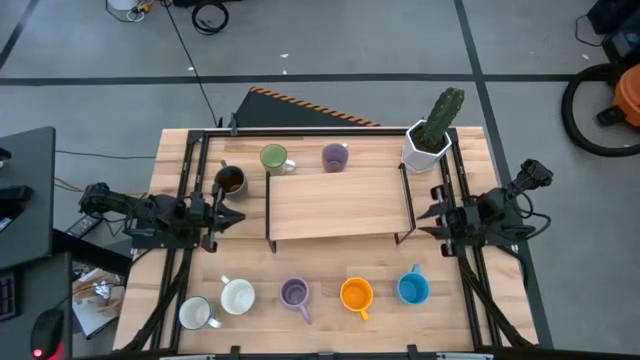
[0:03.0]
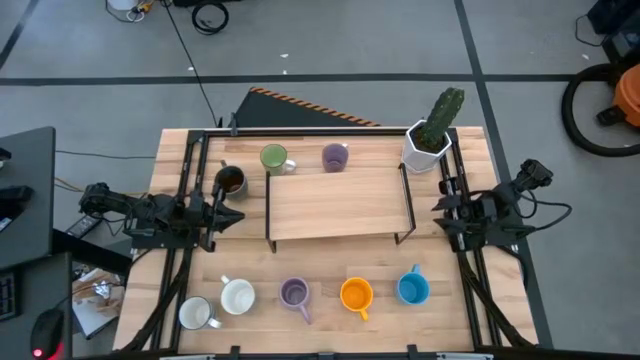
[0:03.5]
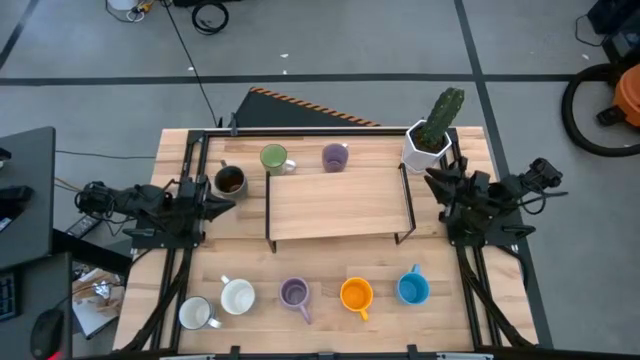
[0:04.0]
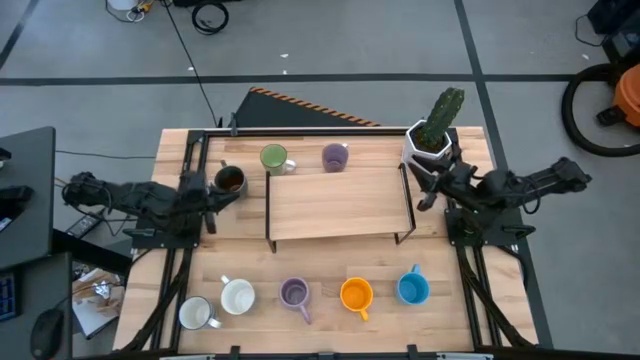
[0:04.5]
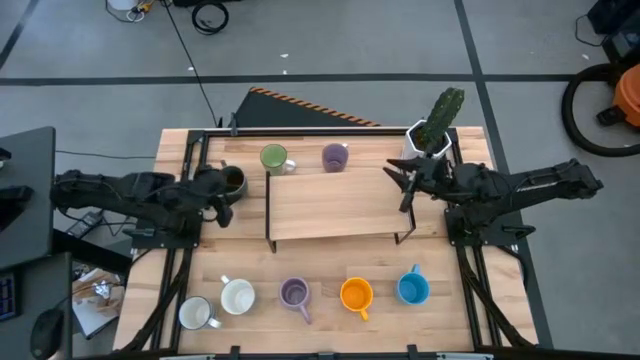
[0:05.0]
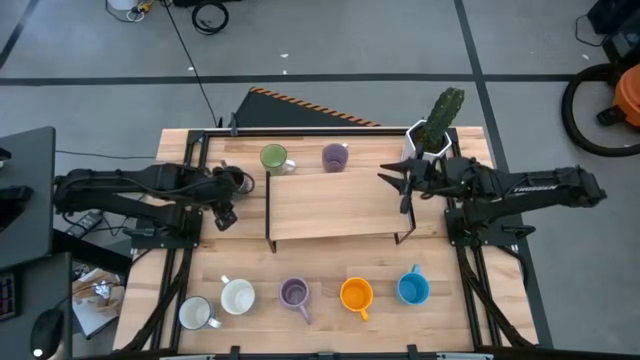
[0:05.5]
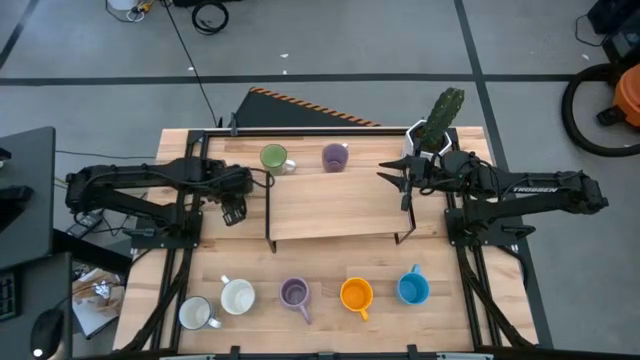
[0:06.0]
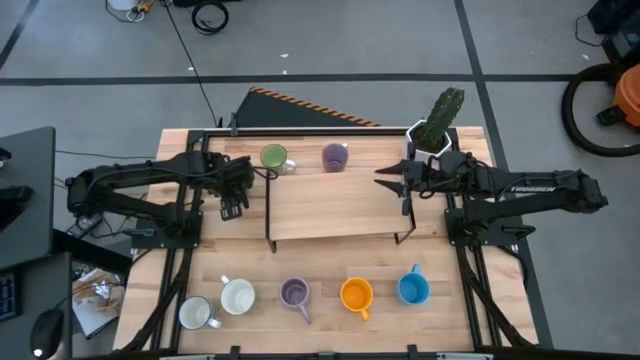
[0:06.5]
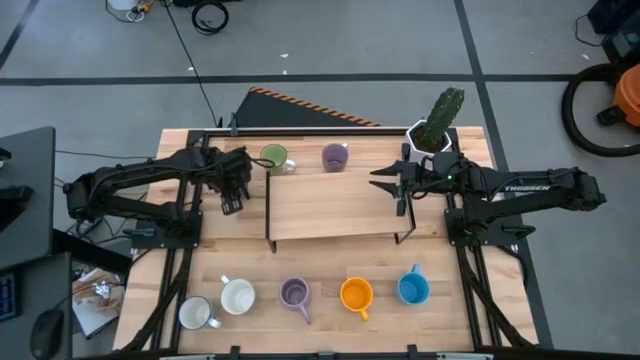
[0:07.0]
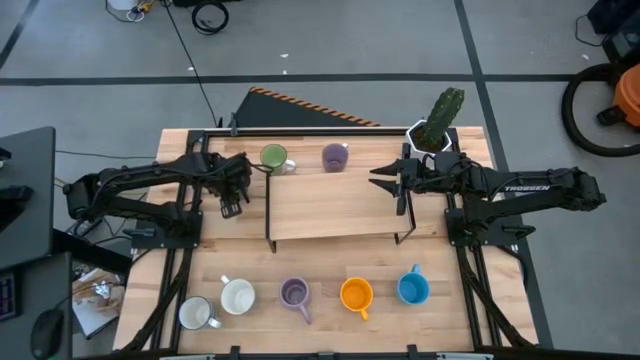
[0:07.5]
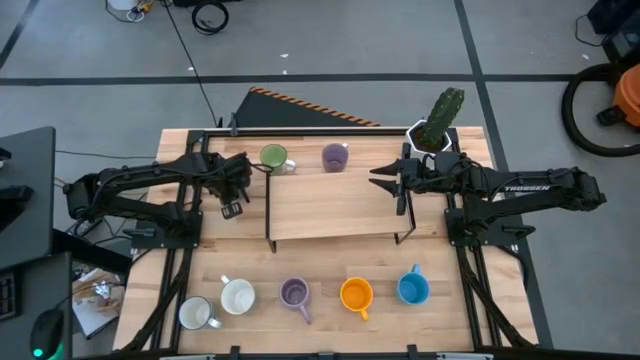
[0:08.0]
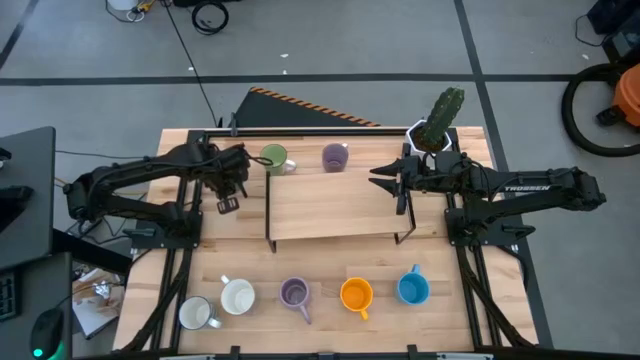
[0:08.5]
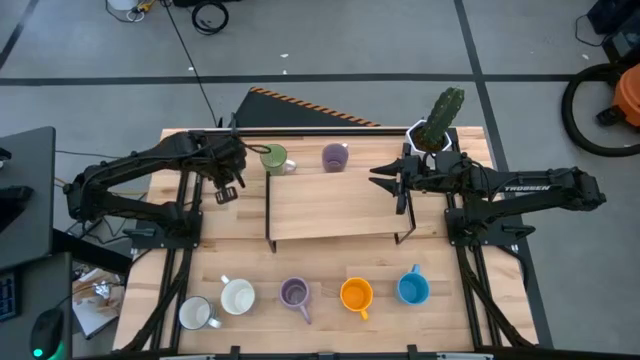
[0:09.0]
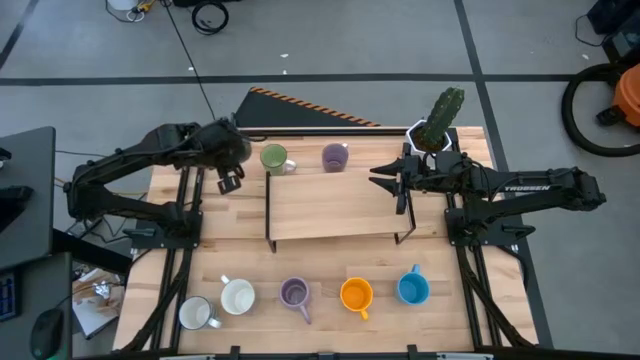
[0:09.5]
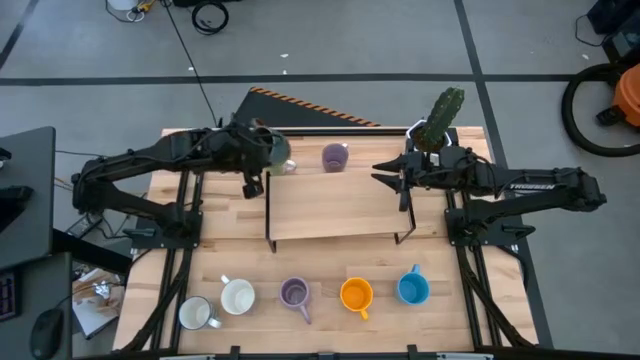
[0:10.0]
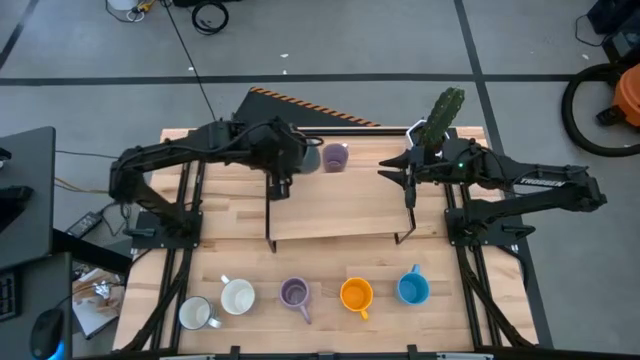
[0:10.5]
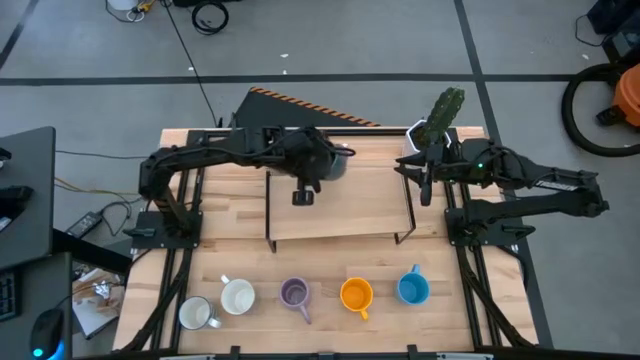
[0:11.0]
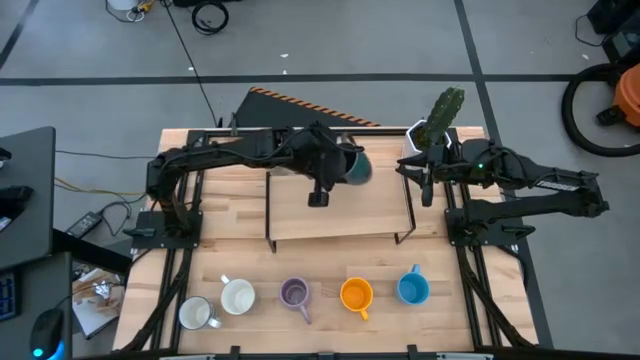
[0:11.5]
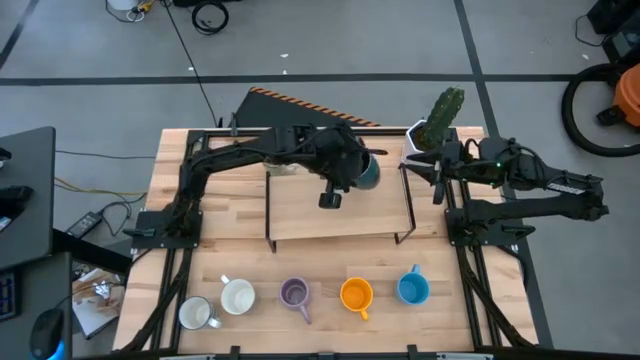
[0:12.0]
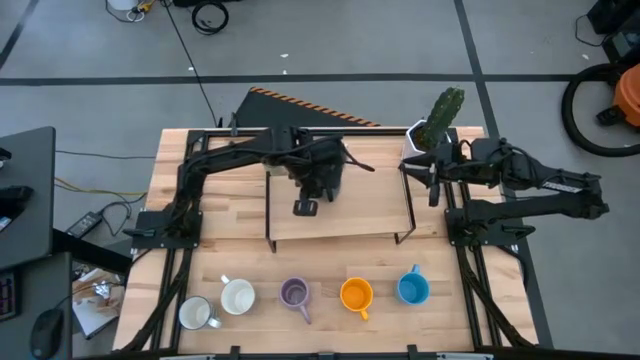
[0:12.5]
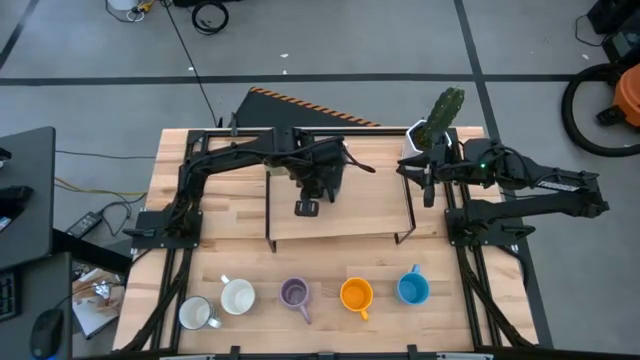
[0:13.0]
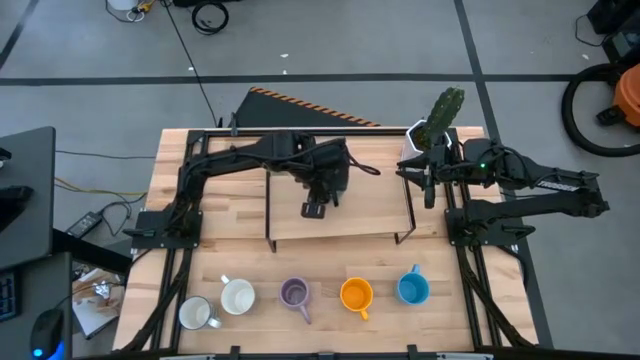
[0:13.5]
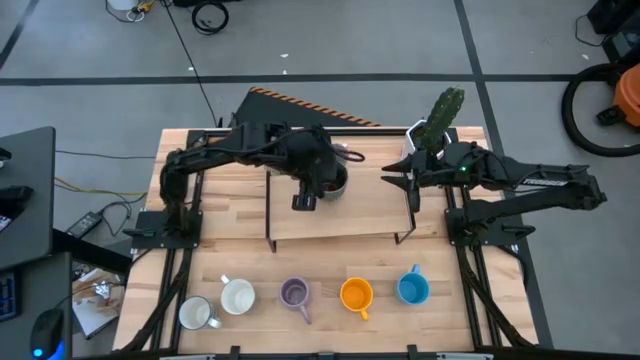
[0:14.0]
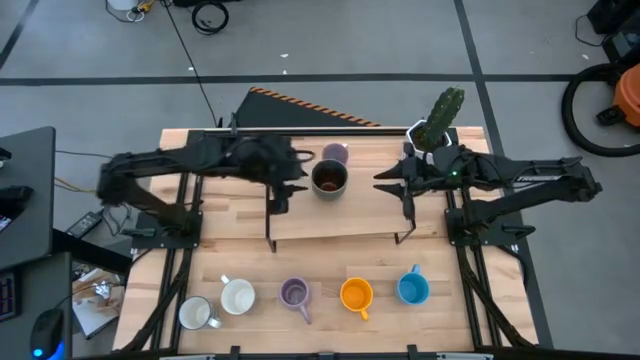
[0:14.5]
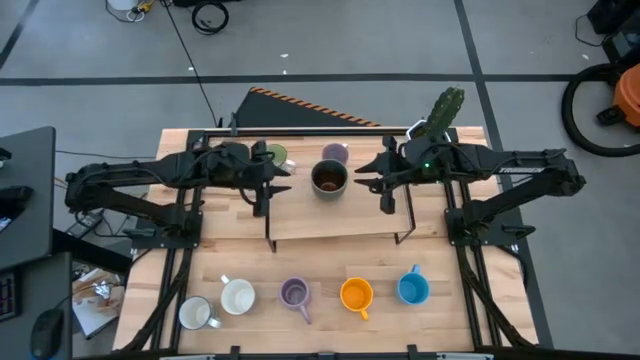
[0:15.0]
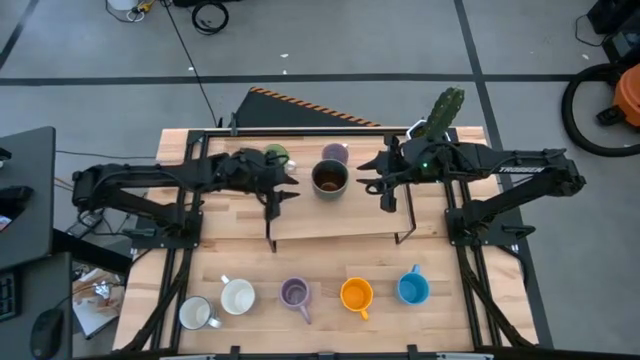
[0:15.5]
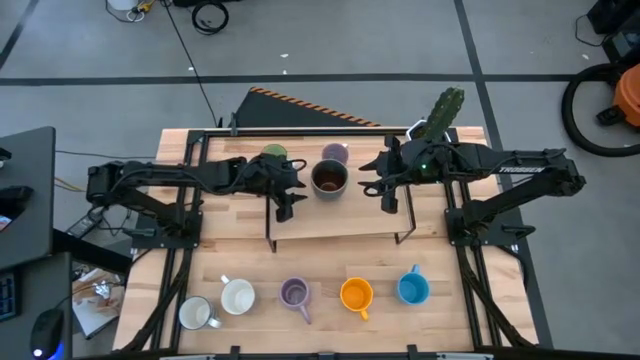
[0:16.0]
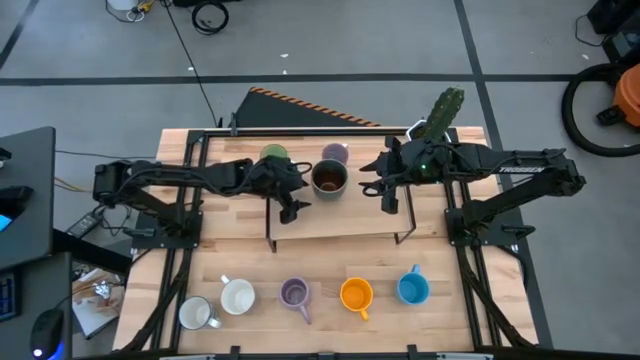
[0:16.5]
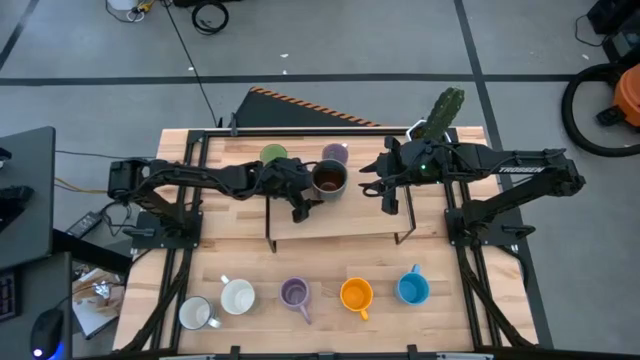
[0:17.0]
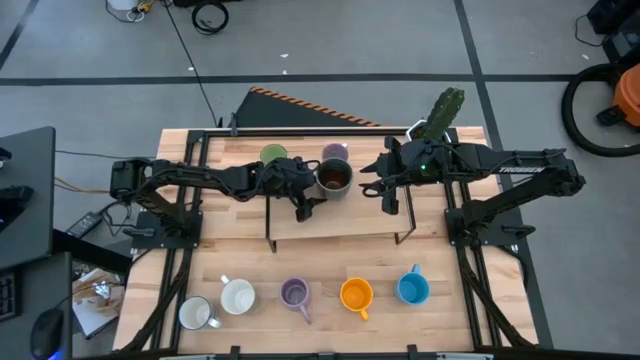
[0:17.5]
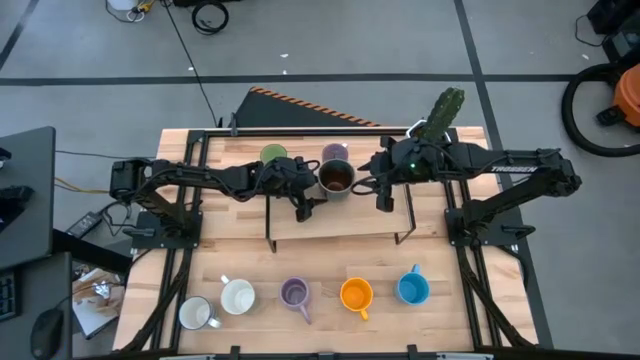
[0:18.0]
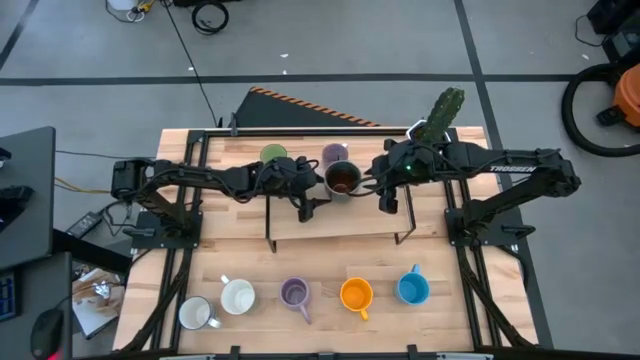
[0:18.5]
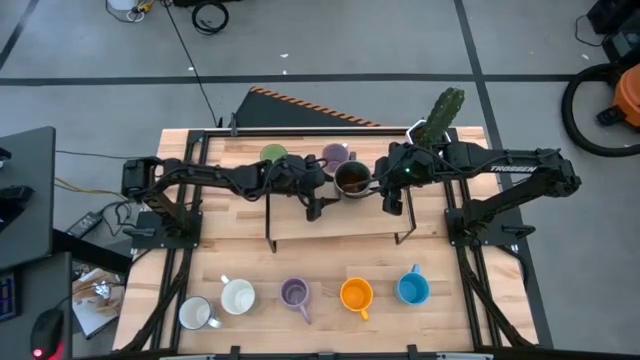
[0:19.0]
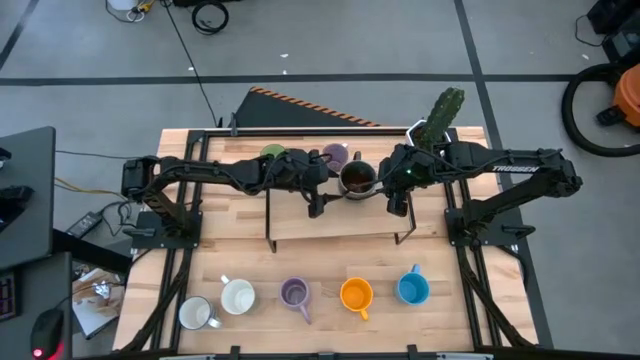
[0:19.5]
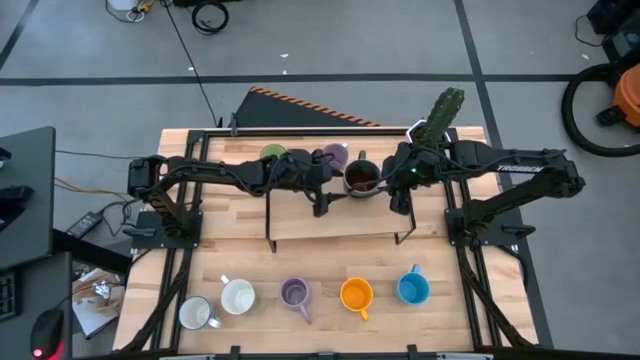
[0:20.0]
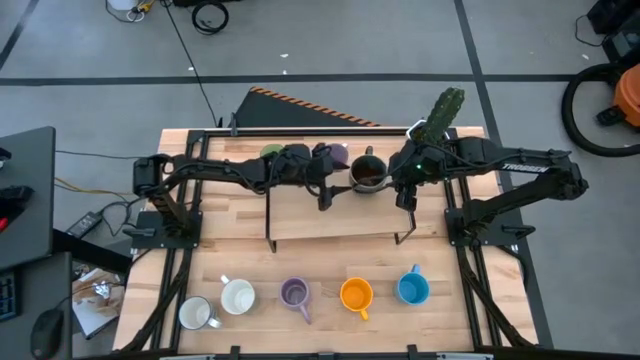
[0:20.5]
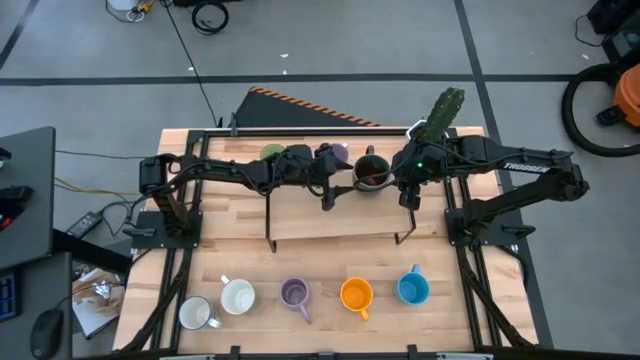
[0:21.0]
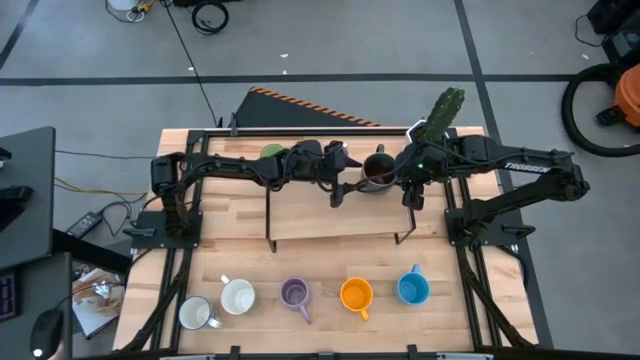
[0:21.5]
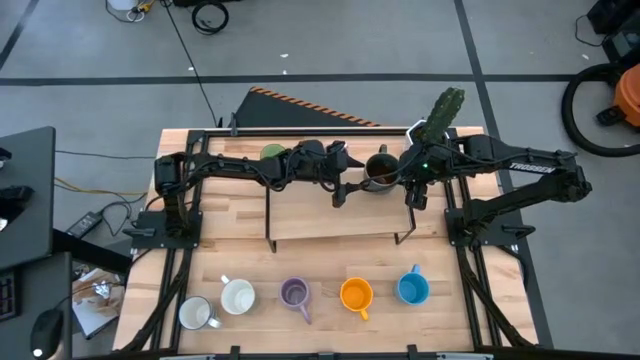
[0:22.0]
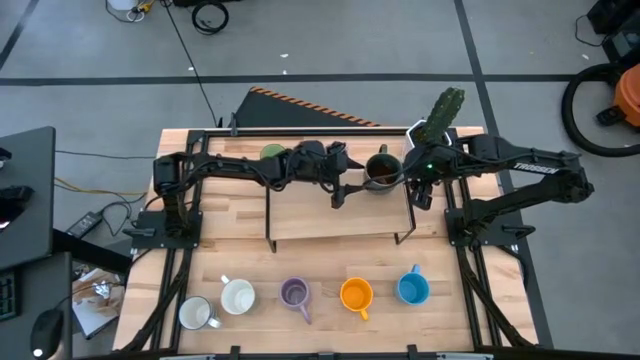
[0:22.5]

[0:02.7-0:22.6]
Task: Place coffee mugs
Put the blue-brown mug on the shelf
